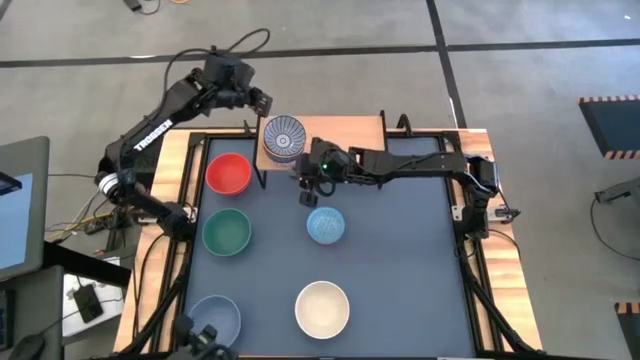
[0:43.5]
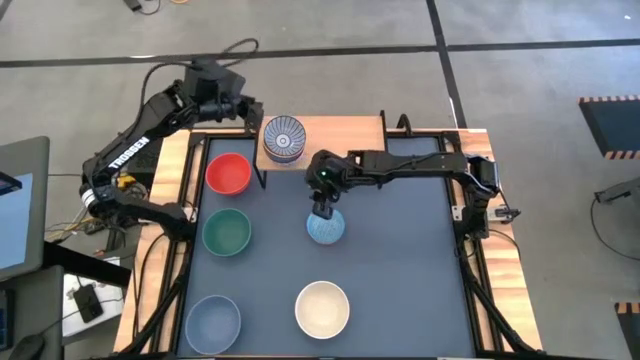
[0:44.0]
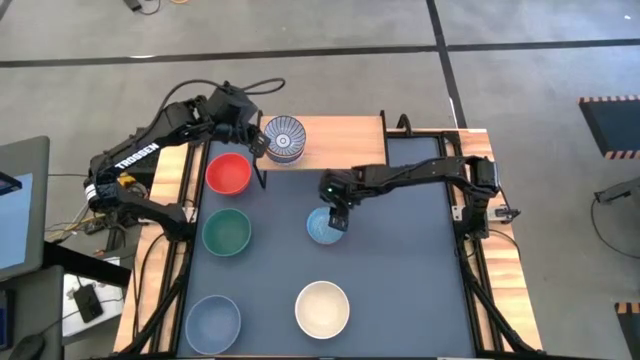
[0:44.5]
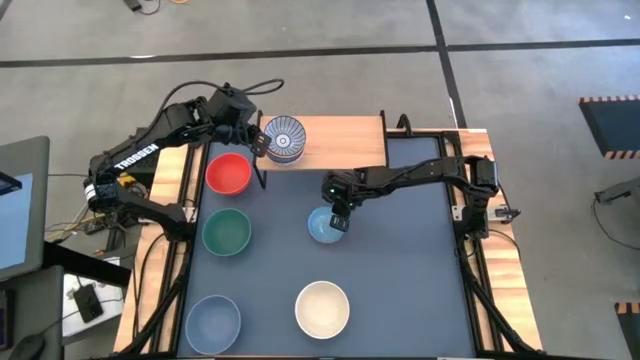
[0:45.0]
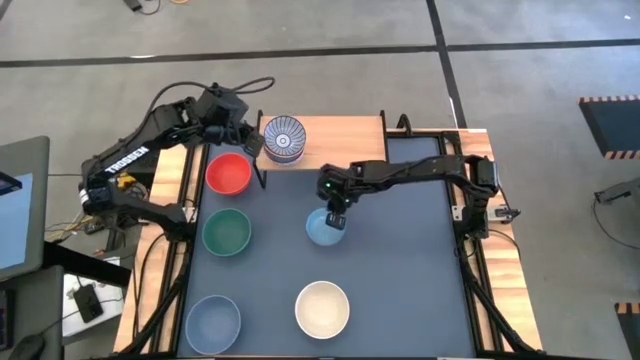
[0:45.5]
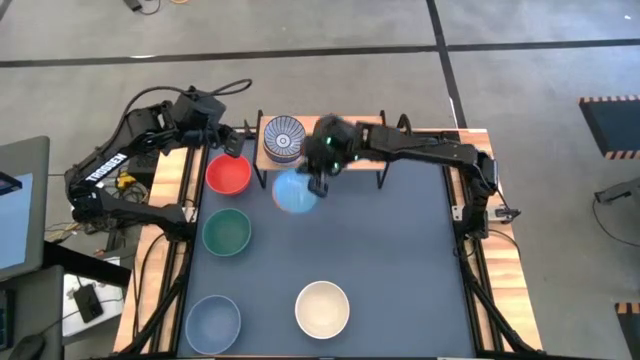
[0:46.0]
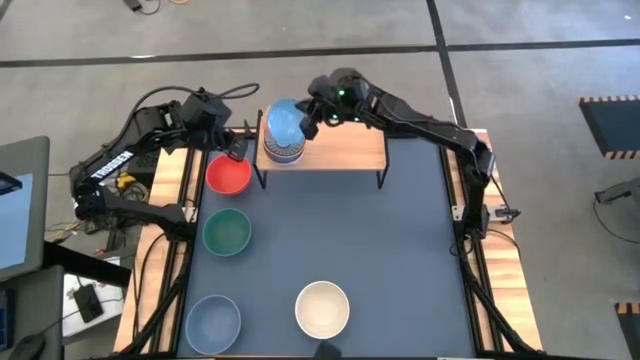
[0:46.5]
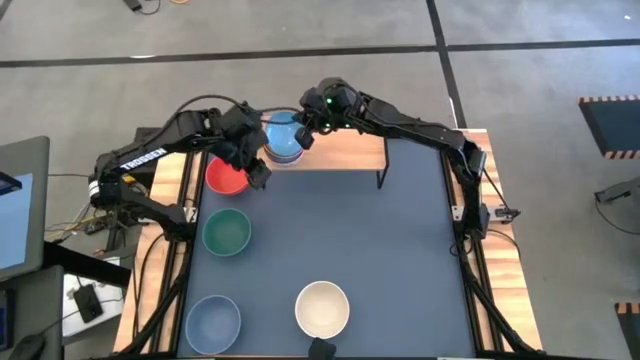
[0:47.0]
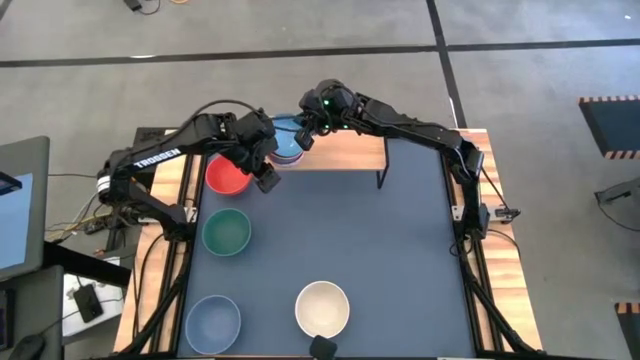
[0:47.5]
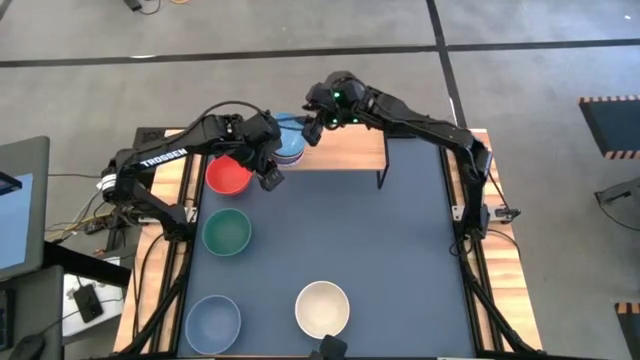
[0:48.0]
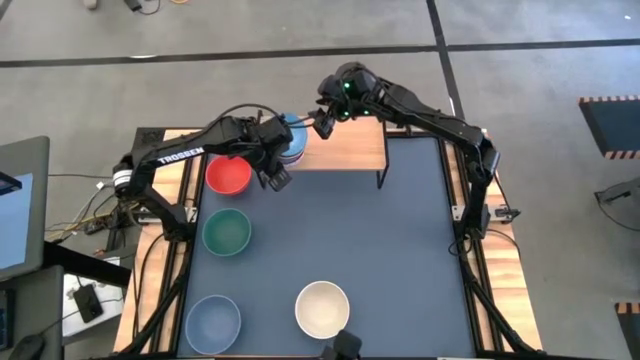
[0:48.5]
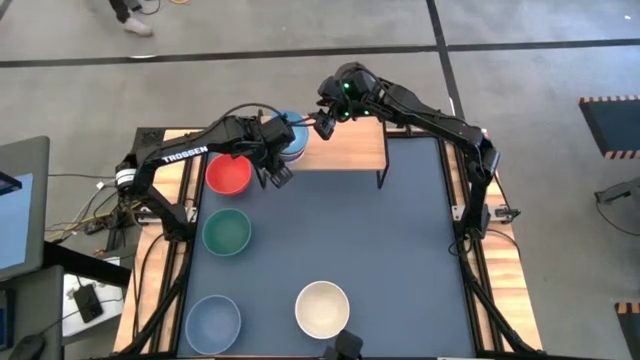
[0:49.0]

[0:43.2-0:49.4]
Task: Place and stack bowls onto a shelf
Stack the light blue patterned bowl on the top of the blue patterned bowl on the shelf

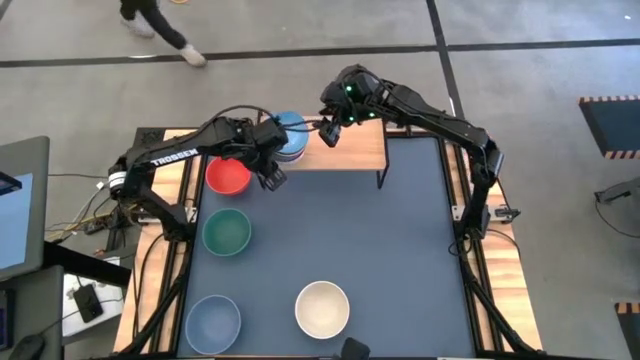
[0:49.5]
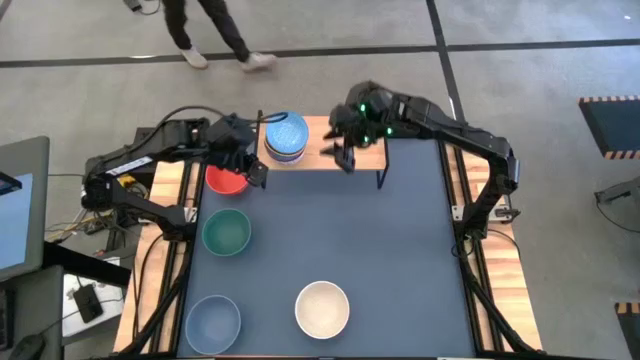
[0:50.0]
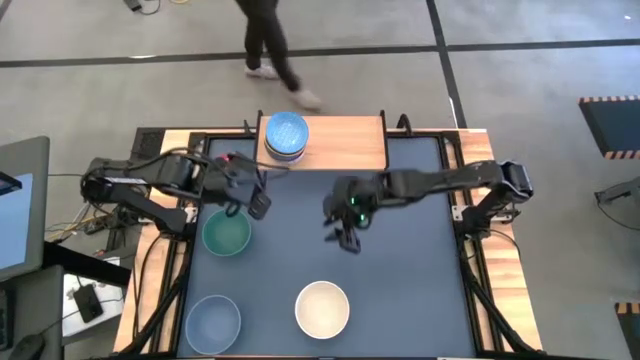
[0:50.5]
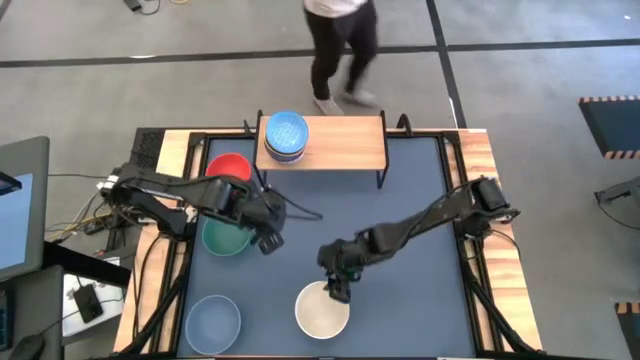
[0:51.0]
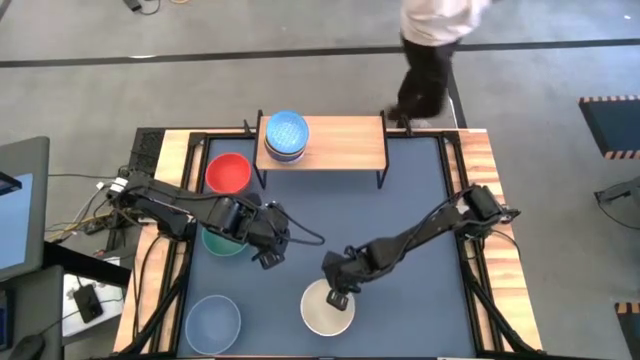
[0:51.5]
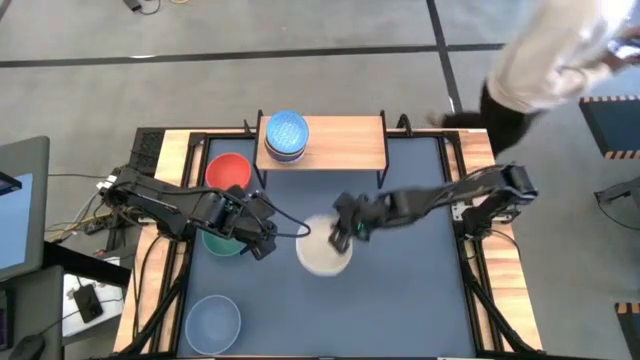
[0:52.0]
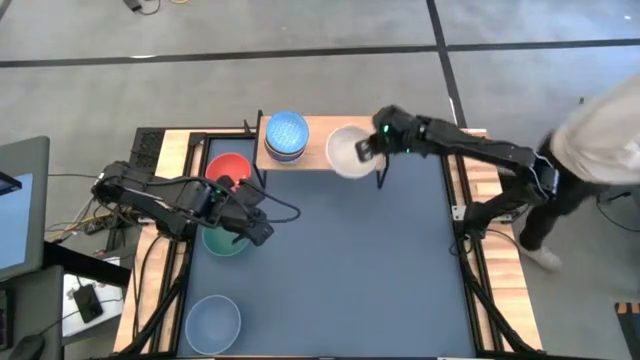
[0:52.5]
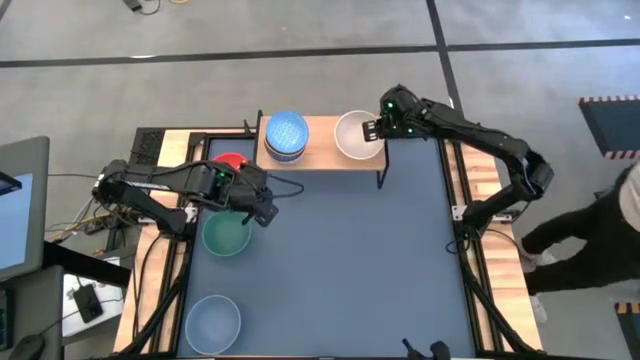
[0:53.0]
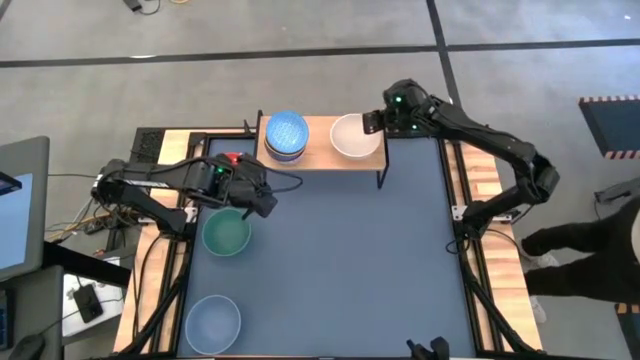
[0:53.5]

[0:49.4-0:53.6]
Put the white bowl on the shelf

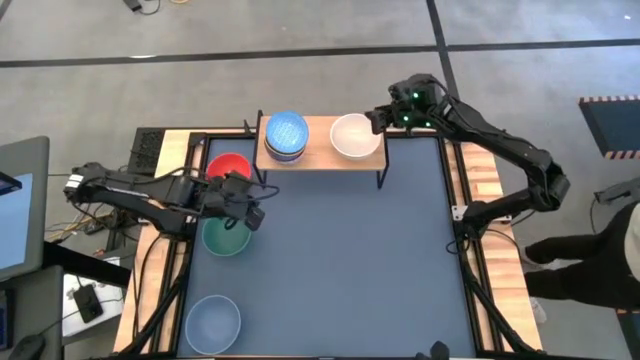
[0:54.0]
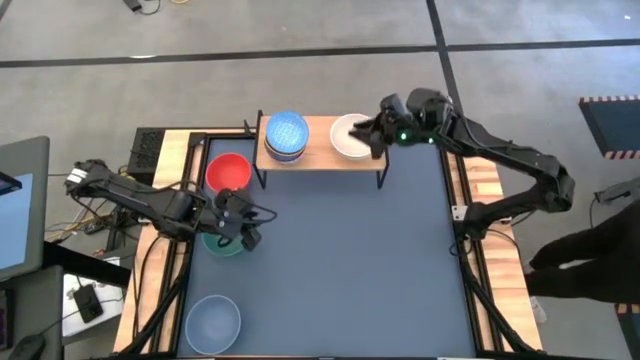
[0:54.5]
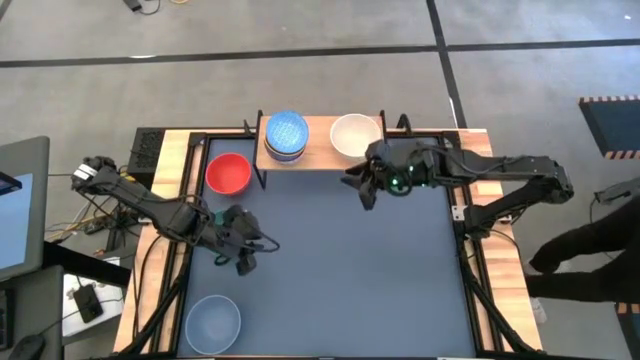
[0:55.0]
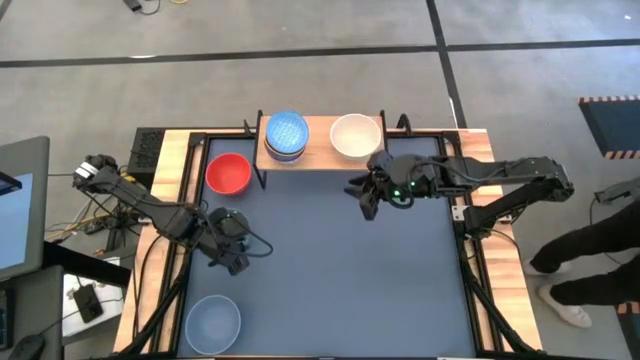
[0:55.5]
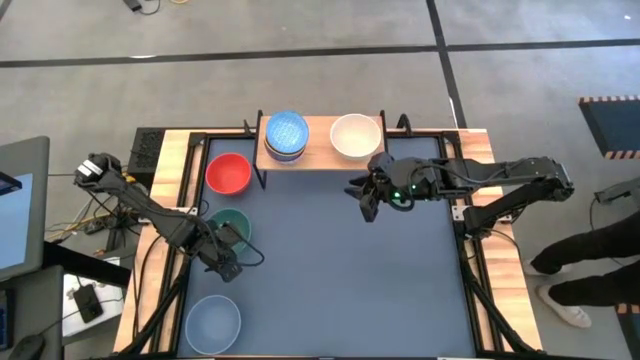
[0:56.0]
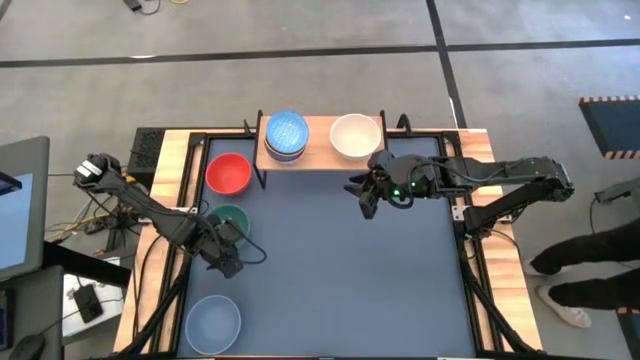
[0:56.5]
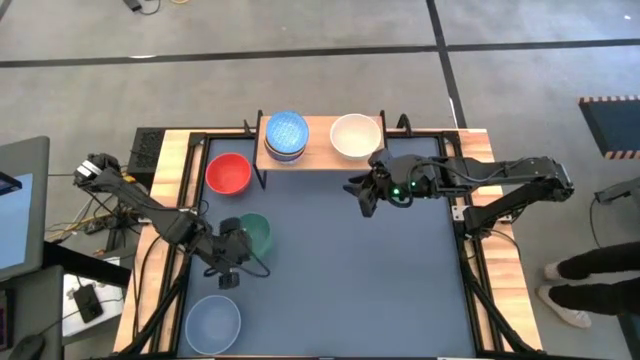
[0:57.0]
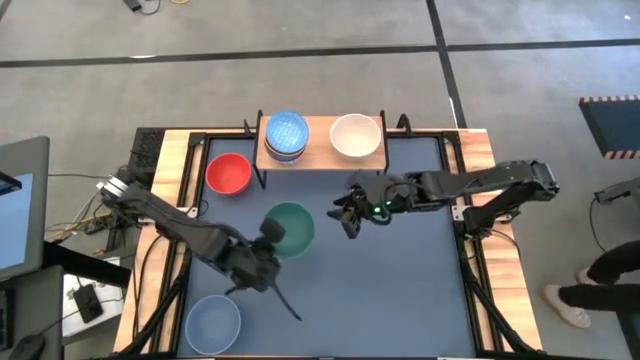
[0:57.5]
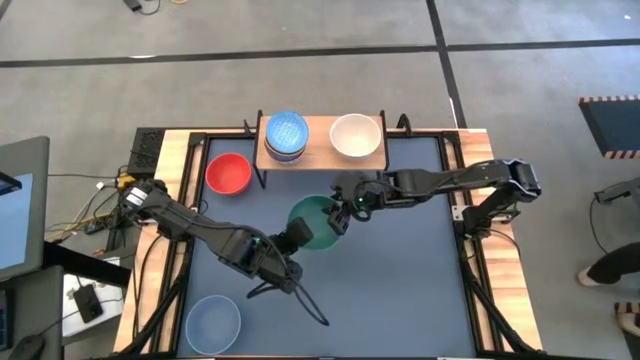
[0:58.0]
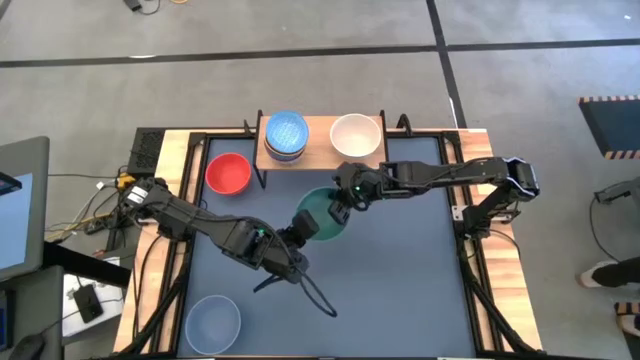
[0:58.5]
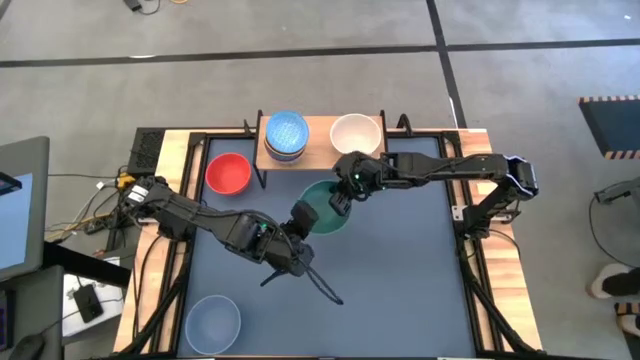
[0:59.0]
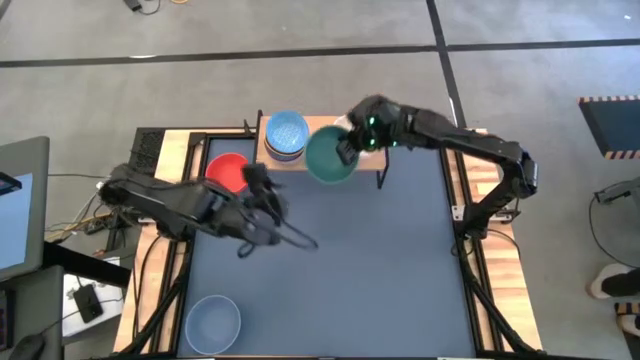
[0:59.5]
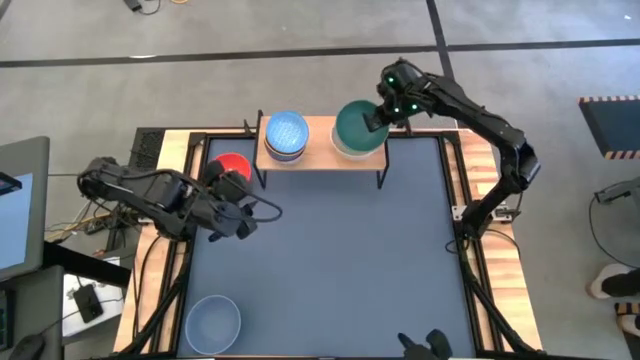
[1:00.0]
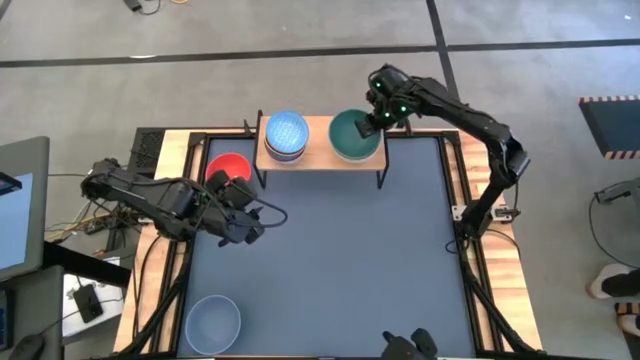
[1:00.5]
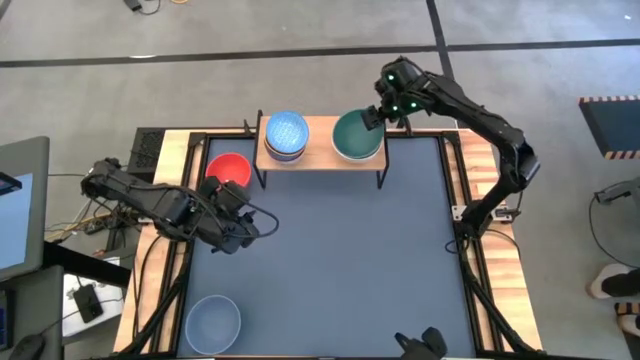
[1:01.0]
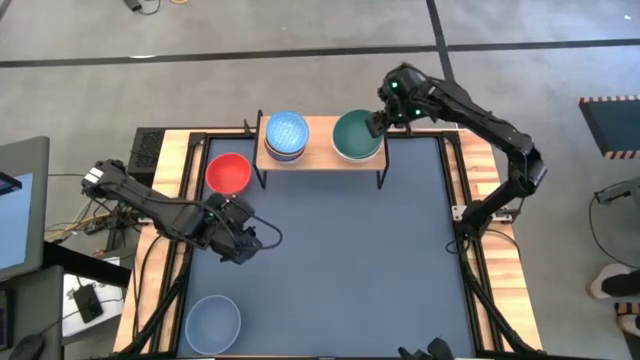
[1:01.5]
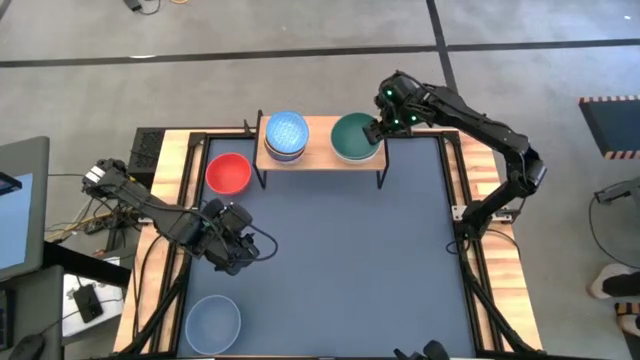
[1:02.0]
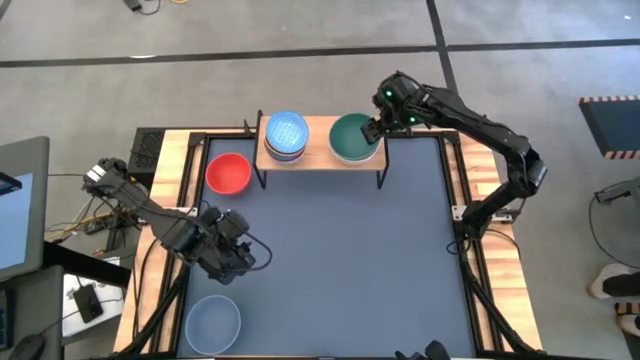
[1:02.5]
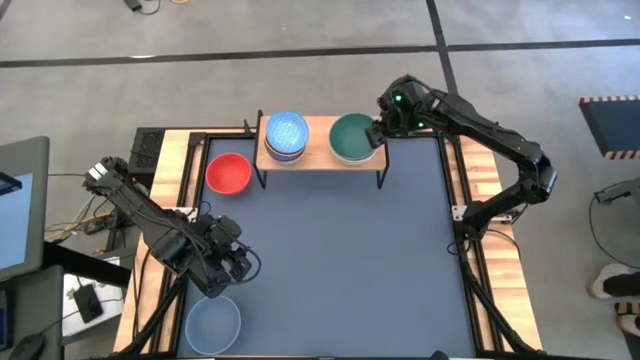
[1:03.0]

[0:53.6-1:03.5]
Stack the green bowl on the top of the white bowl on the shelf

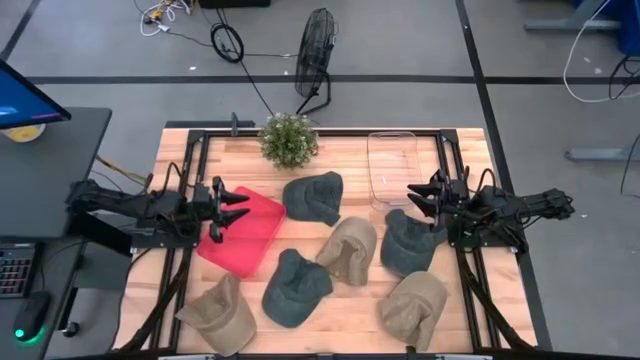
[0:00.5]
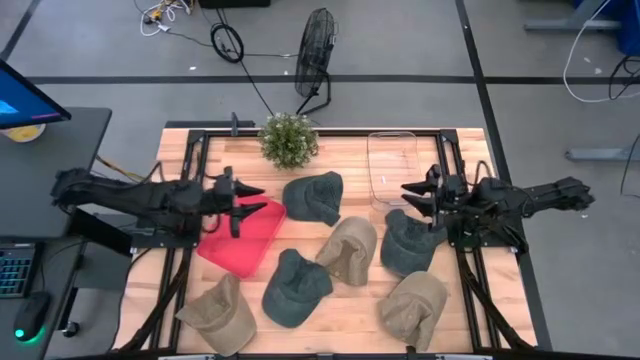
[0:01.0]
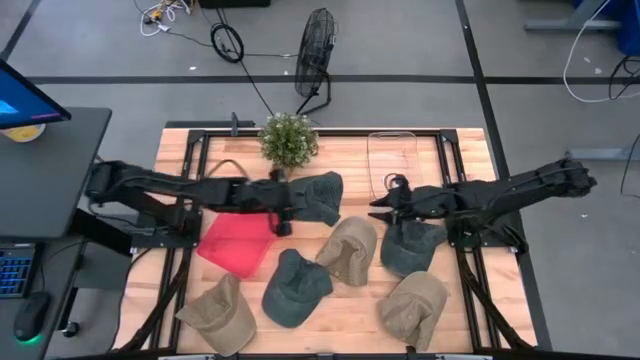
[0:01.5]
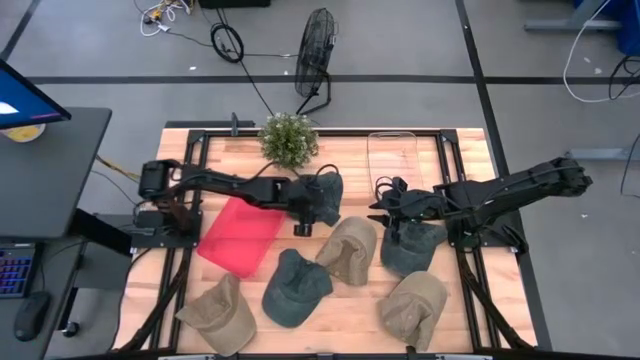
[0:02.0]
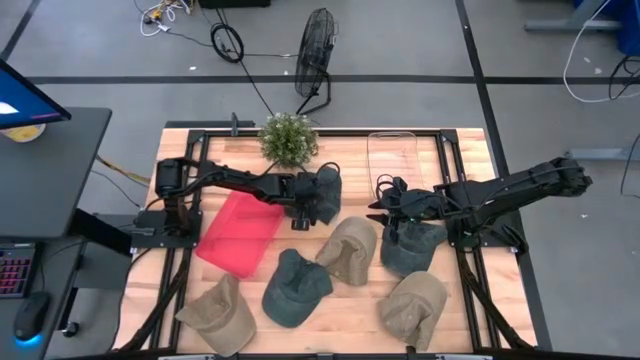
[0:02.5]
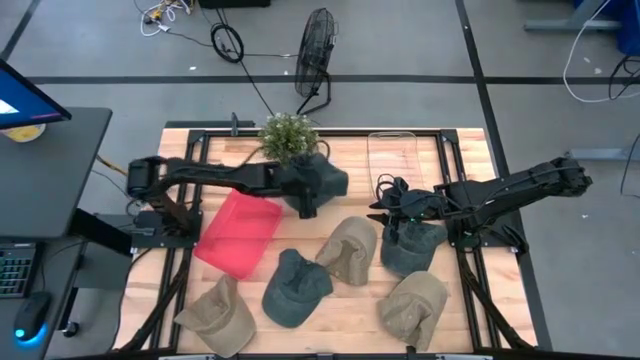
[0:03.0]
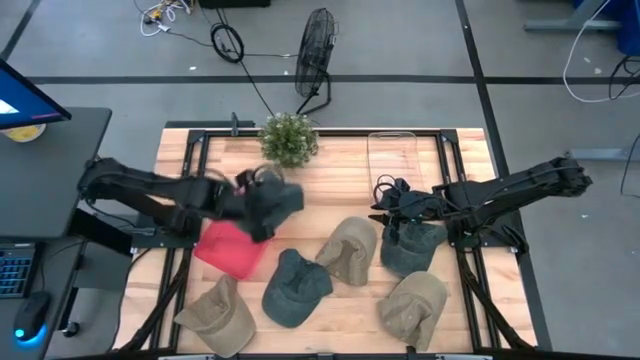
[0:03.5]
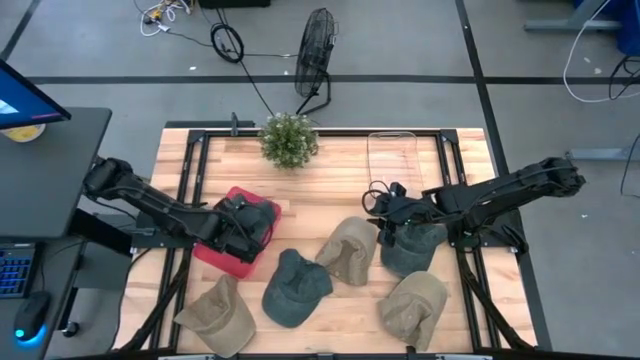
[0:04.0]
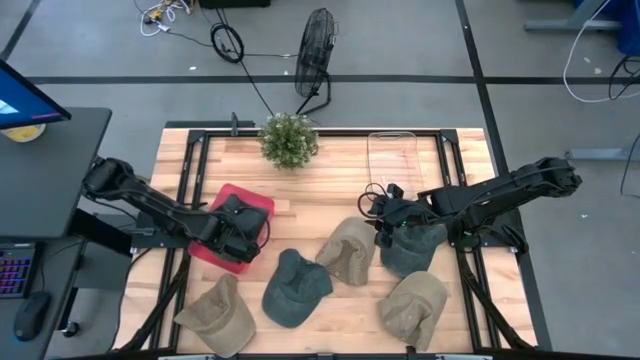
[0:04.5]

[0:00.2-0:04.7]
Task: Pick & Place hat
Put the top black cap into the red bin
